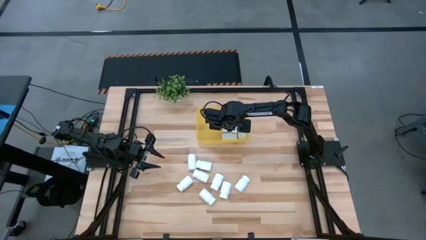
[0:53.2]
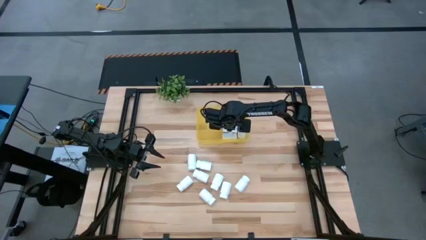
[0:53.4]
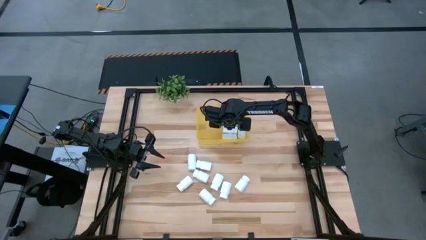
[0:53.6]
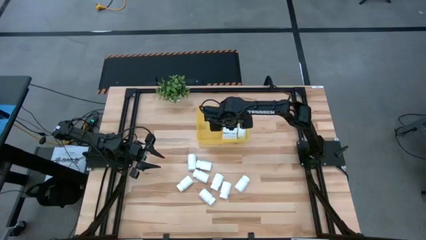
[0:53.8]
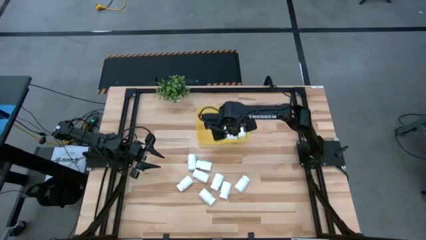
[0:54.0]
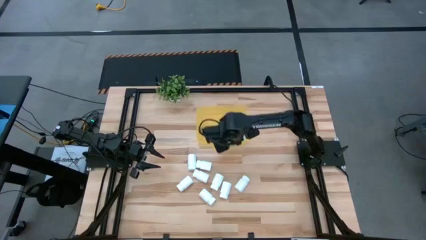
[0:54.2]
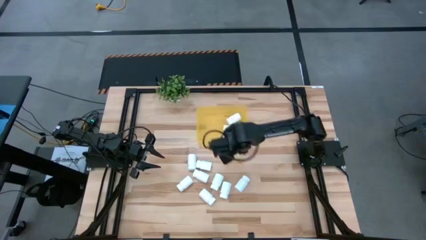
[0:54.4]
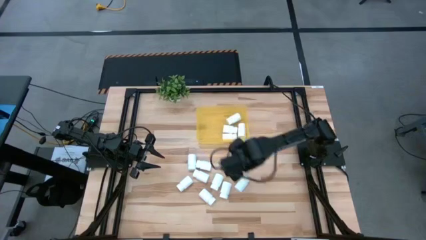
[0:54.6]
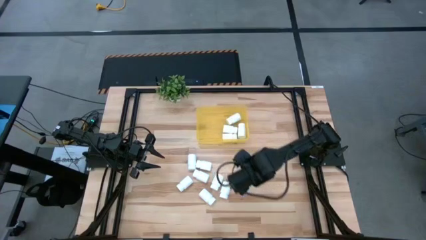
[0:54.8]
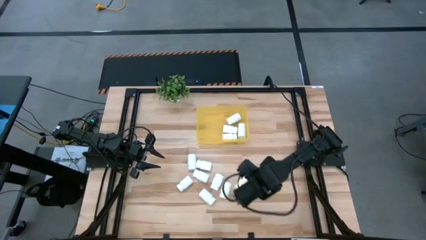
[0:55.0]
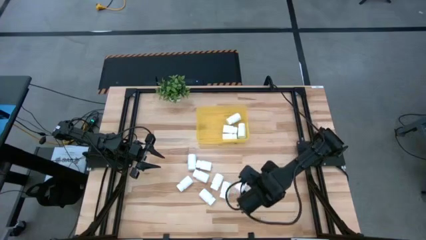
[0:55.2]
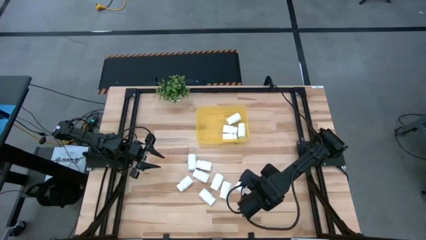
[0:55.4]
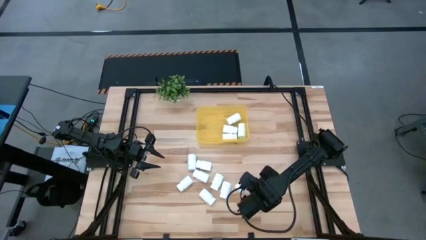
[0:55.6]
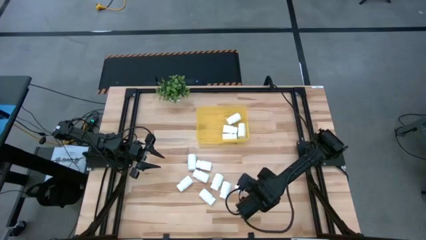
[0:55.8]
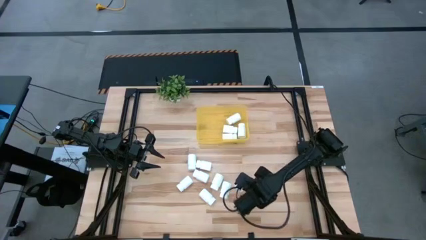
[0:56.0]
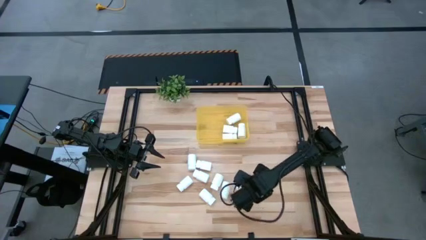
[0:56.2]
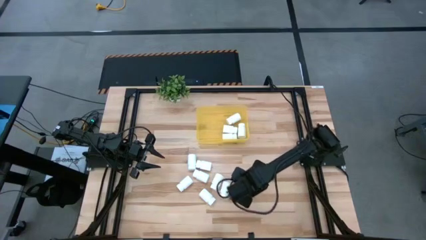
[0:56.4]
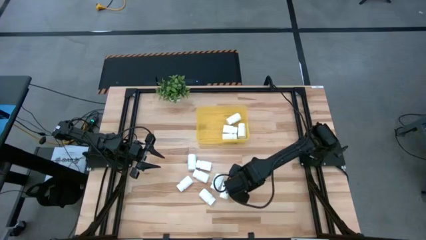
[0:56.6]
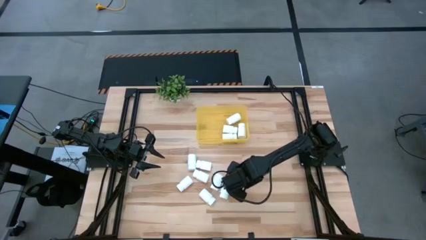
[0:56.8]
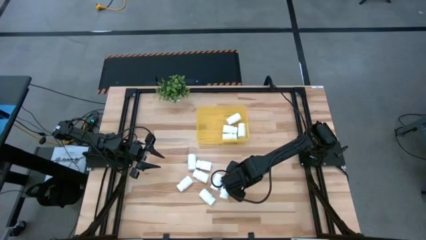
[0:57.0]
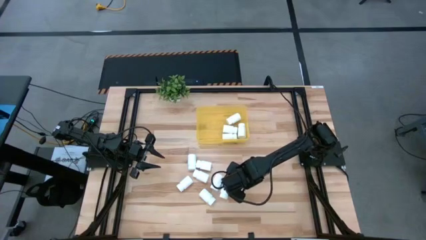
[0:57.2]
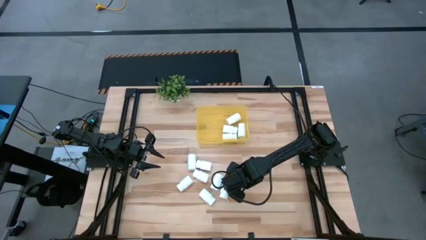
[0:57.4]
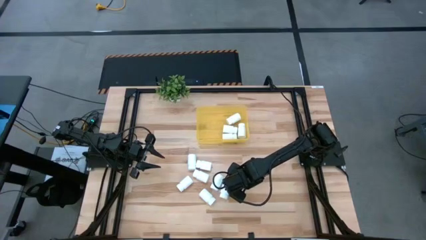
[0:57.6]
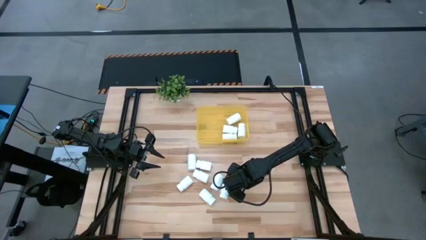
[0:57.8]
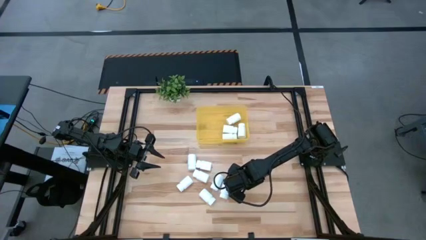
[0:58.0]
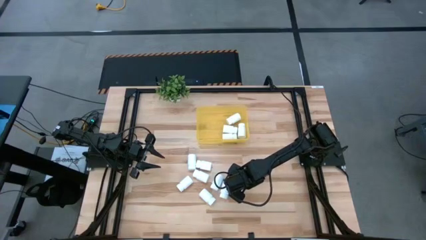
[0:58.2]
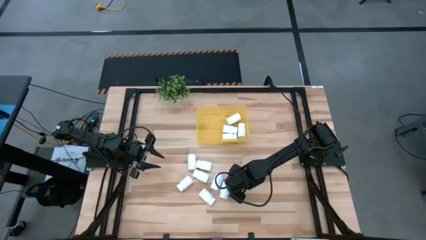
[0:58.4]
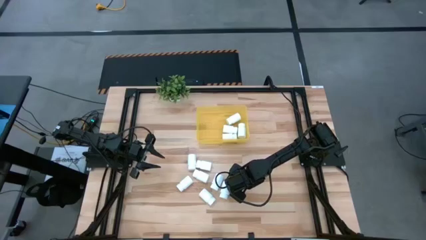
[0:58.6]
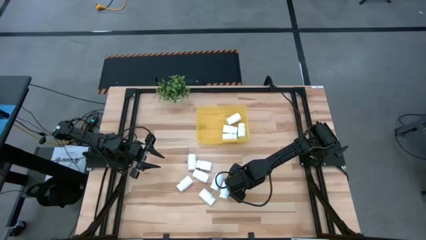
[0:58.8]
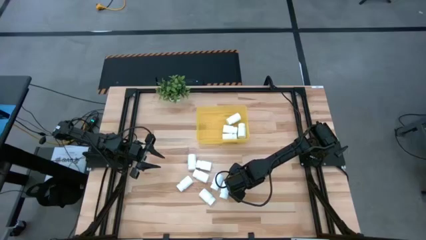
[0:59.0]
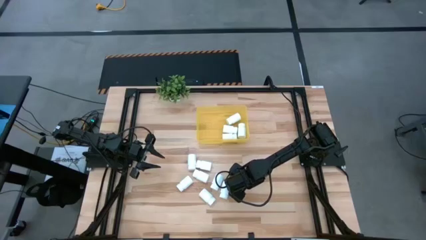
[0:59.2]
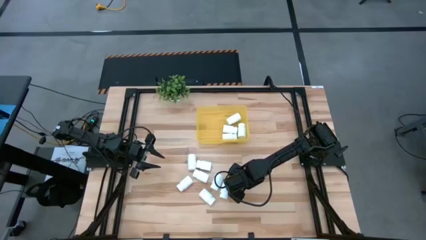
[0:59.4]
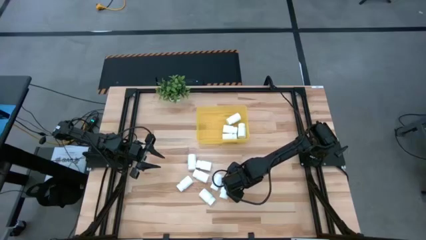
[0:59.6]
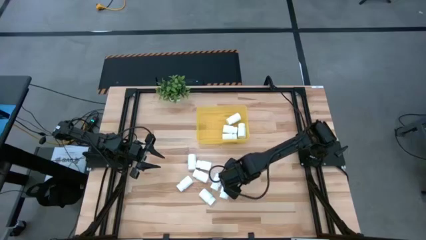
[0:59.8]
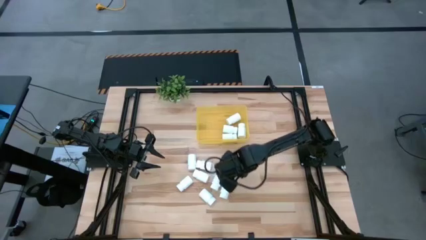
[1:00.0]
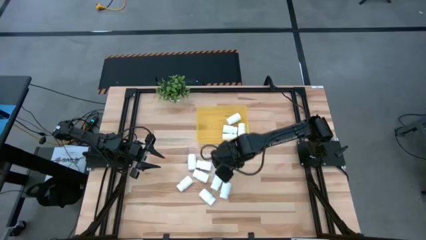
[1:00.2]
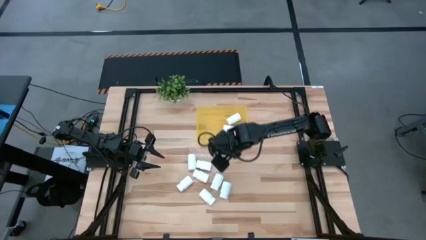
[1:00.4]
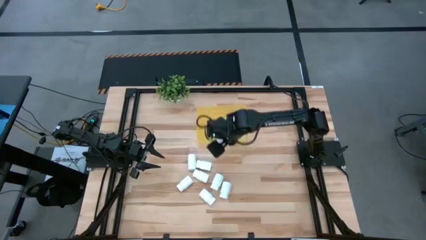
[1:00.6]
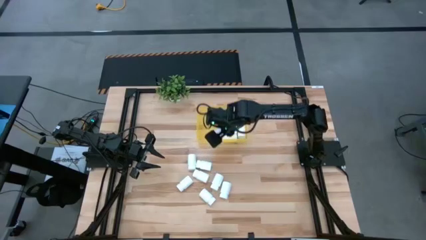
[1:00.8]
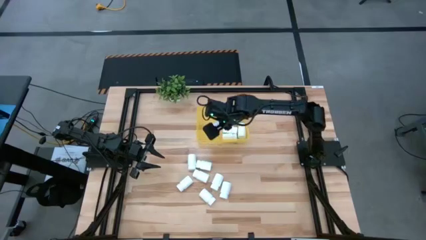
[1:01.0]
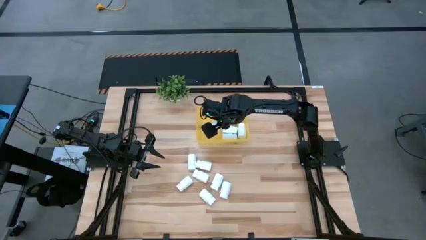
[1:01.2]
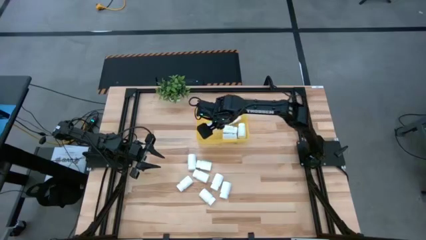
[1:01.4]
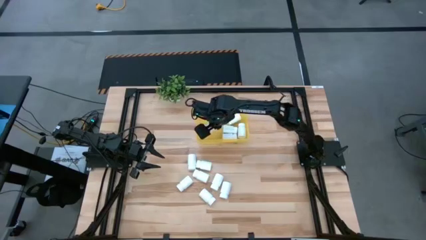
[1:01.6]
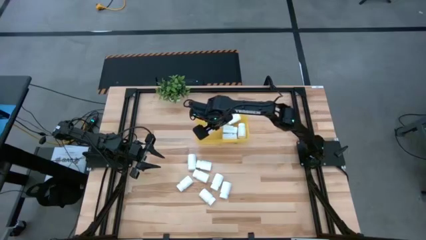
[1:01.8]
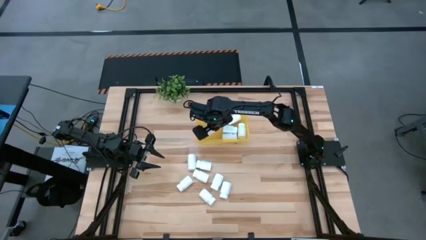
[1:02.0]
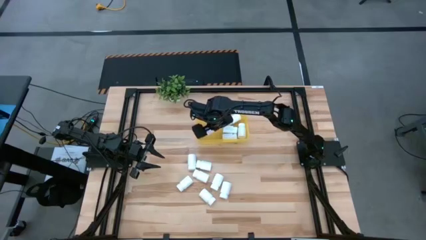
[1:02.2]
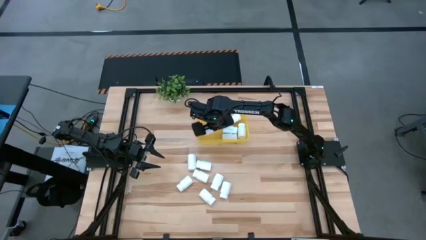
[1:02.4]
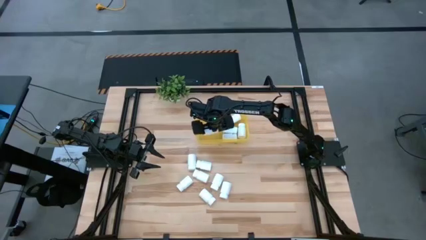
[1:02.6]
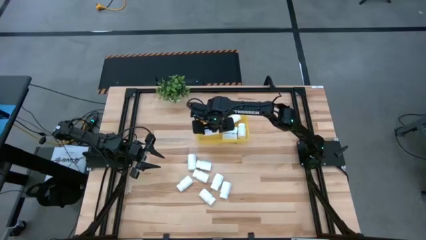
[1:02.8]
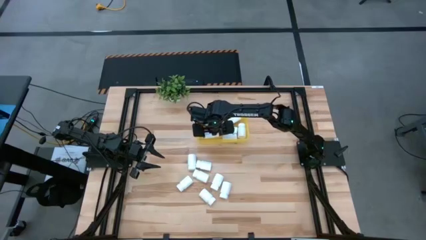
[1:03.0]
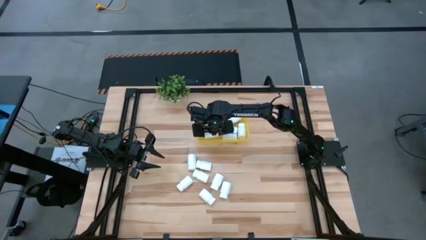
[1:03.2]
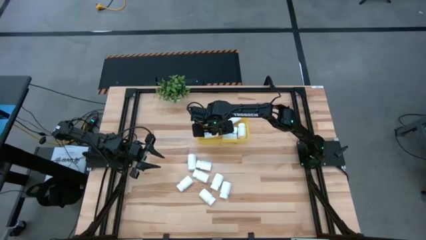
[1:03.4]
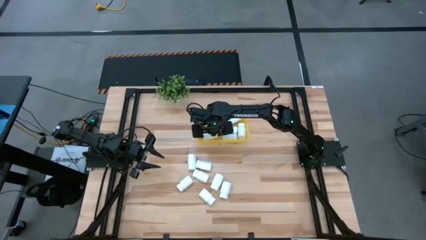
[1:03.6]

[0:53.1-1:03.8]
Task: Pick and place pill bottles into a basket
Put the white pill bottle into the yellow bin

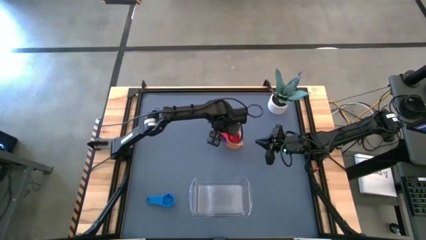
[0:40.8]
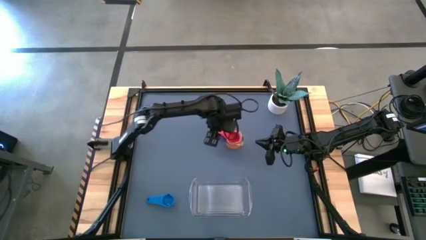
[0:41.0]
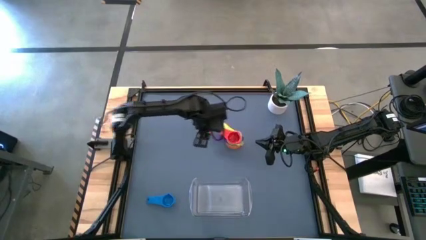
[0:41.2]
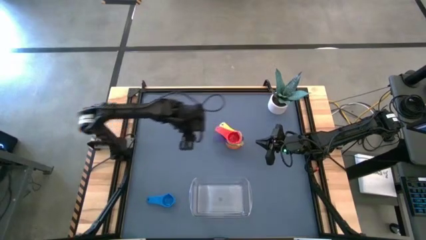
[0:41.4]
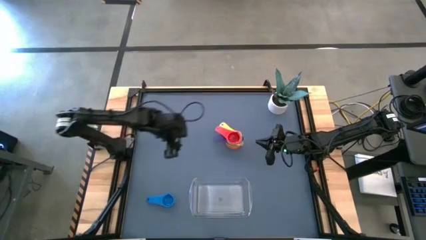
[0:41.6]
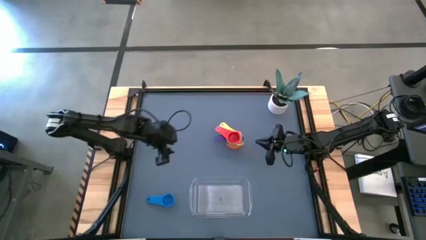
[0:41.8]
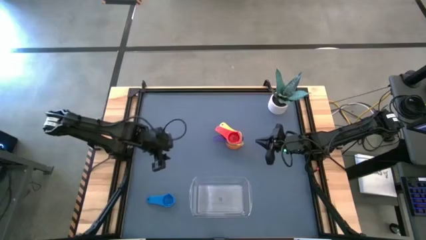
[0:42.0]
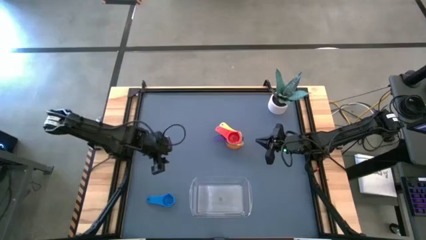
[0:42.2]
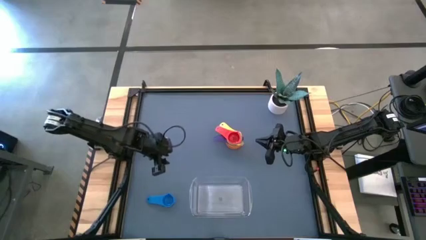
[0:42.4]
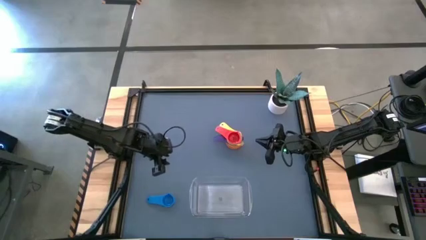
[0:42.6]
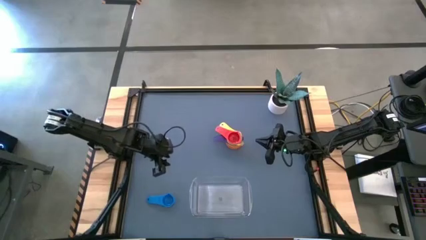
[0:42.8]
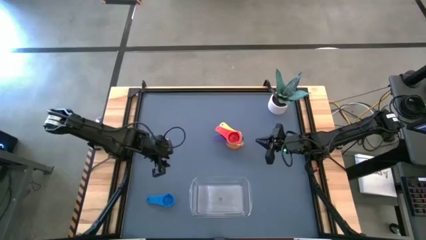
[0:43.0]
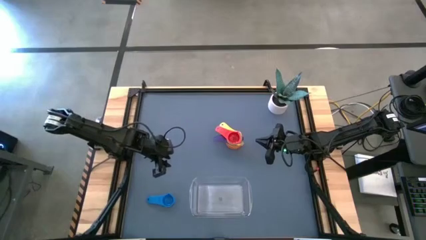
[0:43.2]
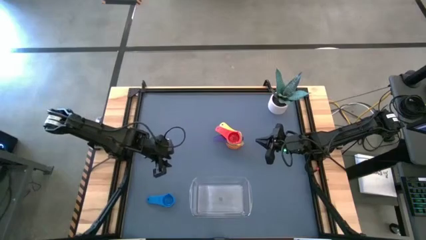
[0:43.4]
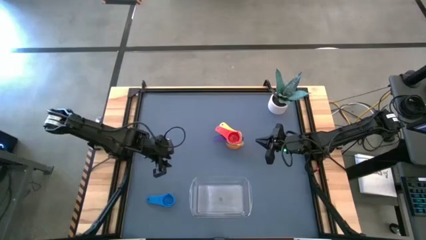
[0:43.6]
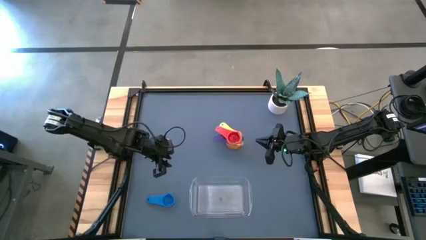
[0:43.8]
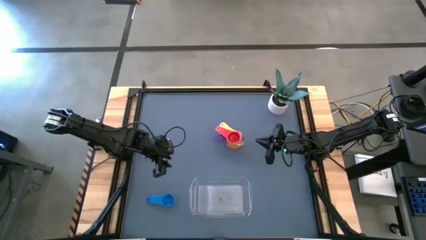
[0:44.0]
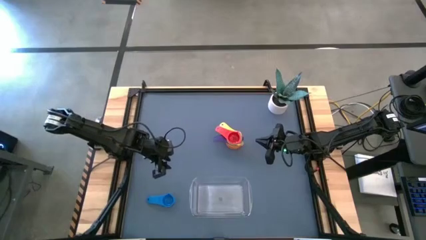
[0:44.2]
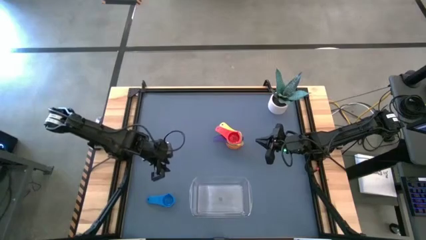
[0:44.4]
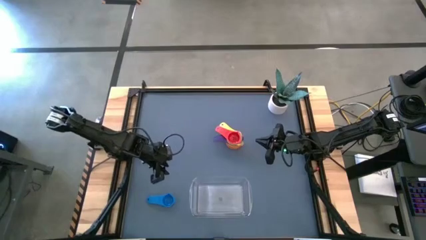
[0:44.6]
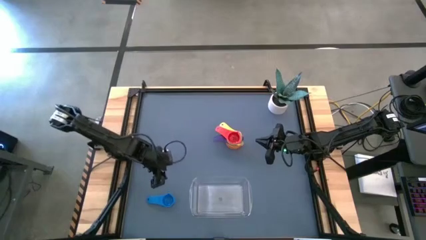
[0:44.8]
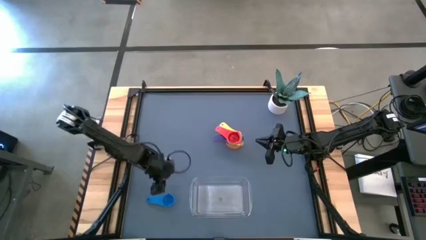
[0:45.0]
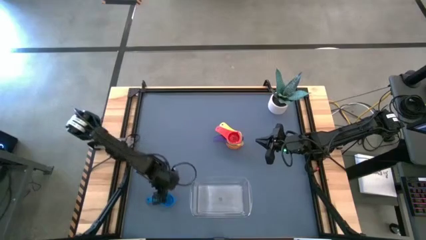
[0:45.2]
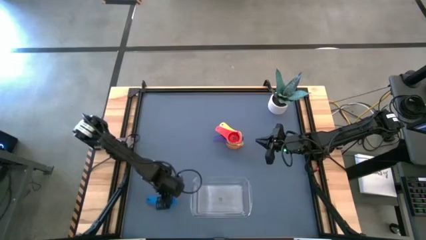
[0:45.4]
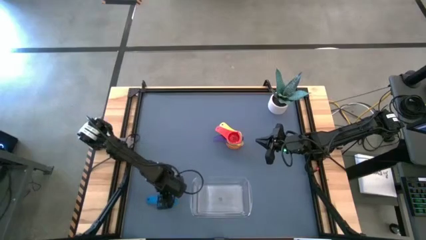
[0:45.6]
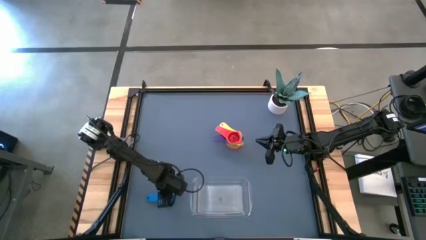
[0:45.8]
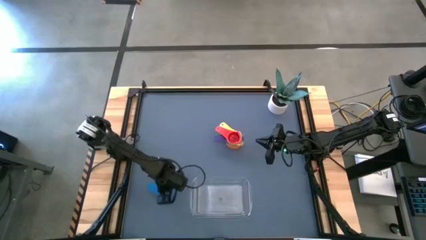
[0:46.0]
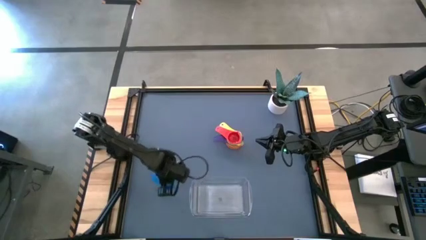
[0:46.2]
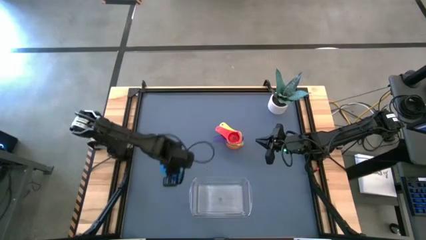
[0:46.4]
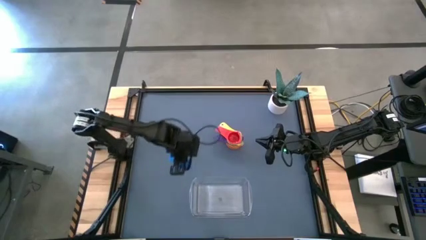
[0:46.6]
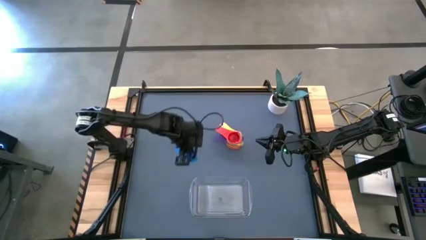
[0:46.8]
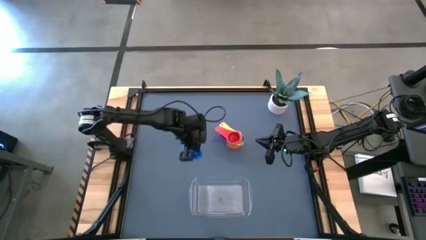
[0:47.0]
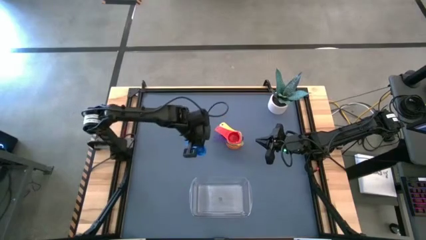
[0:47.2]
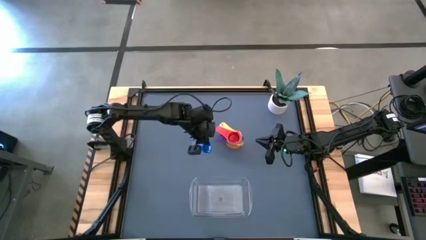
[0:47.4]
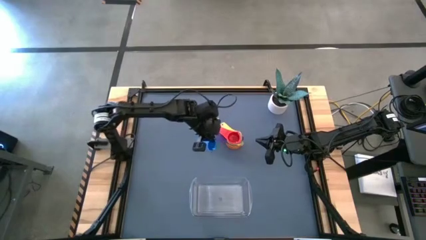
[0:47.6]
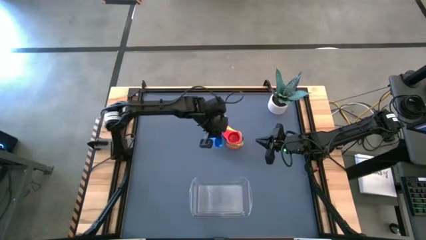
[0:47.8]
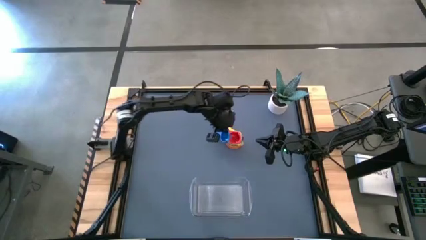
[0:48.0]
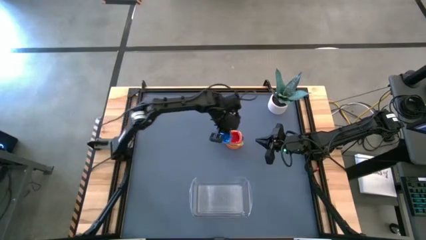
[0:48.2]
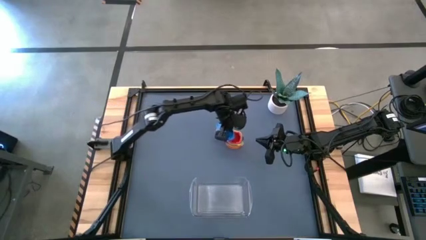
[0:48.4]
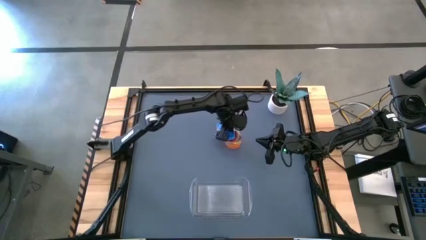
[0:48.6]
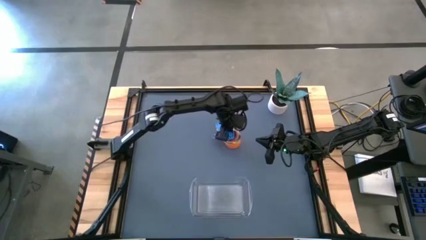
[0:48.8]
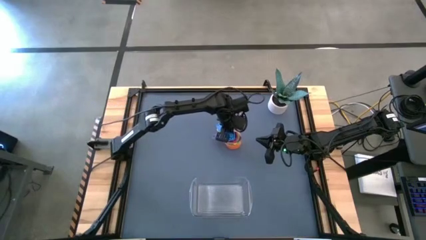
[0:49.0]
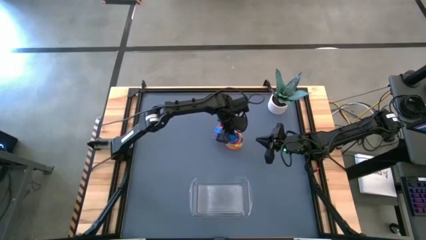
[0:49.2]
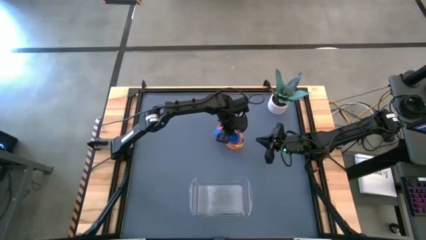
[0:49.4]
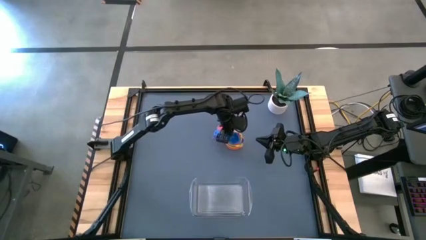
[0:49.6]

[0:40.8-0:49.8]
Task: Nest measuring cups in basket
Stack the blue measuring cup on top of the red measuring cup
